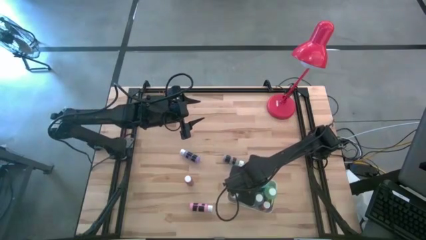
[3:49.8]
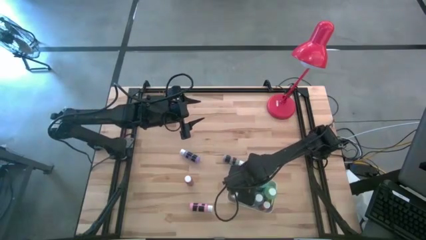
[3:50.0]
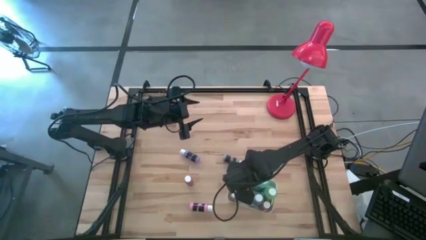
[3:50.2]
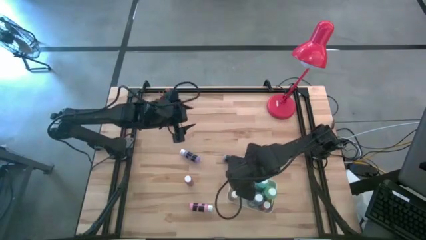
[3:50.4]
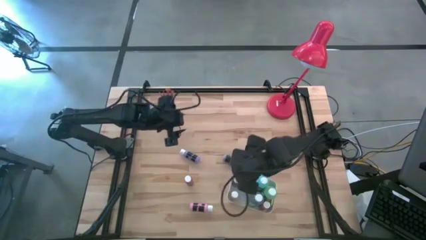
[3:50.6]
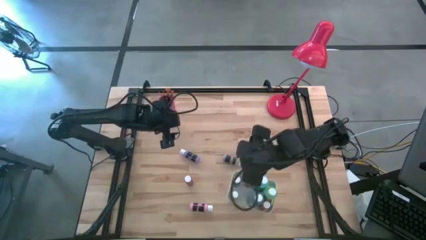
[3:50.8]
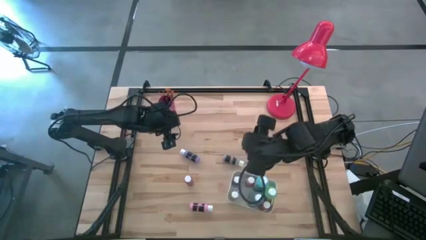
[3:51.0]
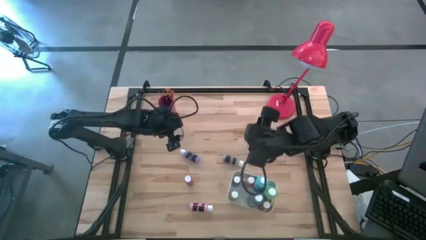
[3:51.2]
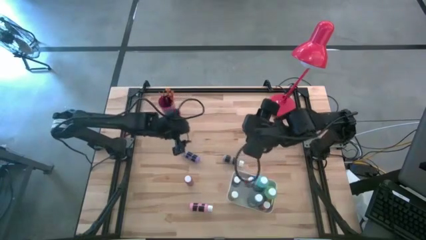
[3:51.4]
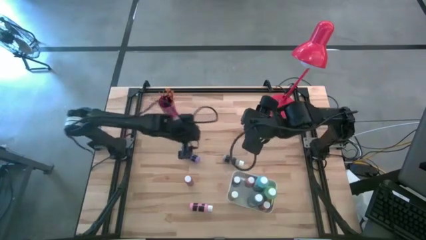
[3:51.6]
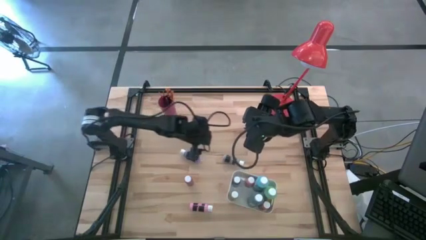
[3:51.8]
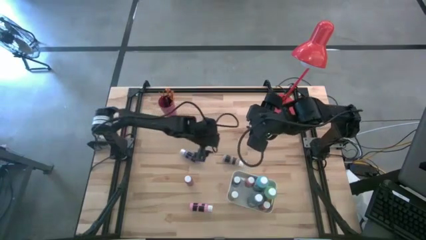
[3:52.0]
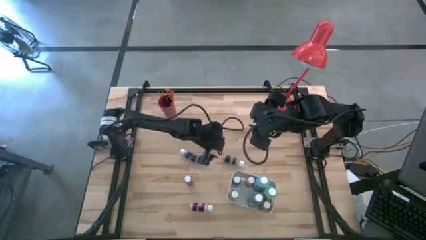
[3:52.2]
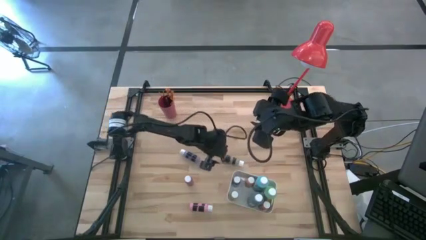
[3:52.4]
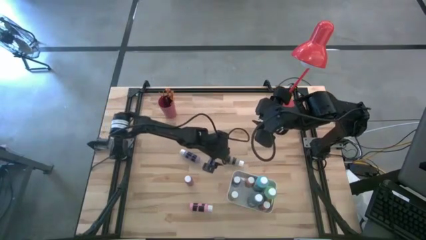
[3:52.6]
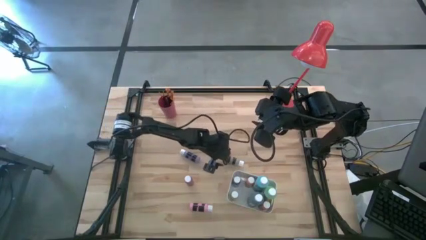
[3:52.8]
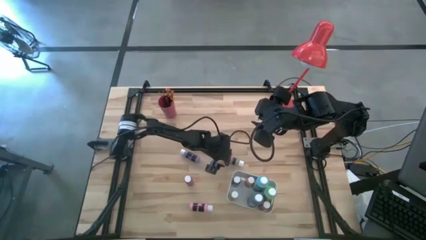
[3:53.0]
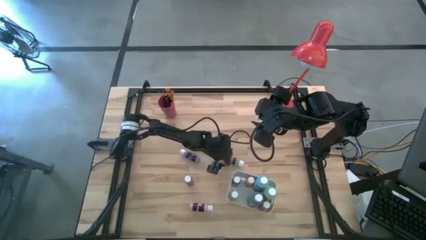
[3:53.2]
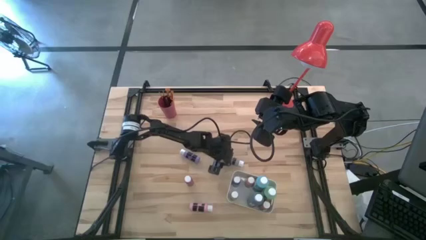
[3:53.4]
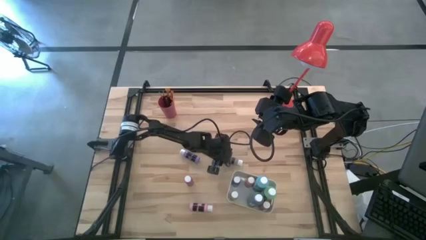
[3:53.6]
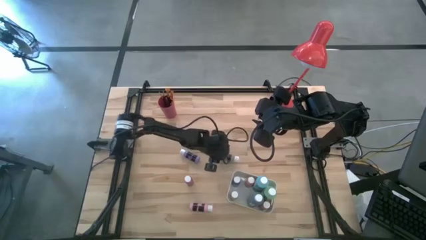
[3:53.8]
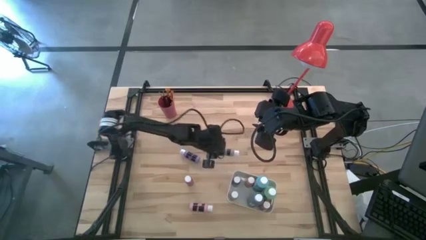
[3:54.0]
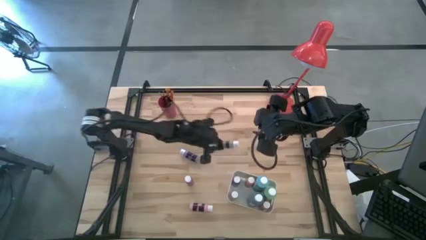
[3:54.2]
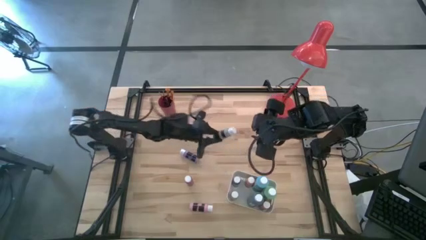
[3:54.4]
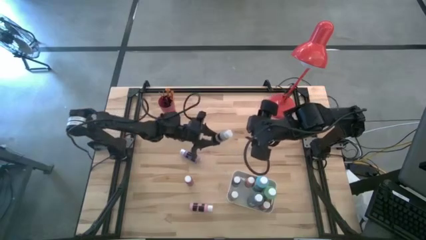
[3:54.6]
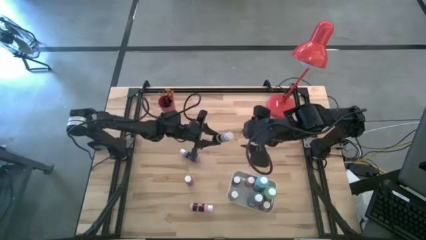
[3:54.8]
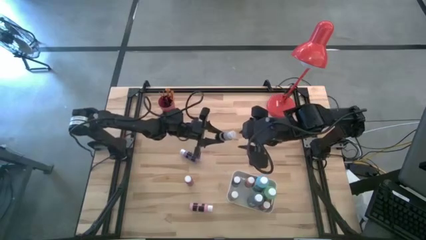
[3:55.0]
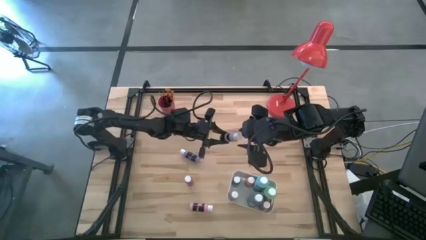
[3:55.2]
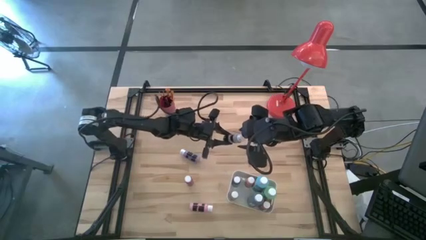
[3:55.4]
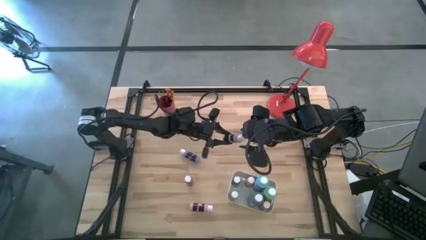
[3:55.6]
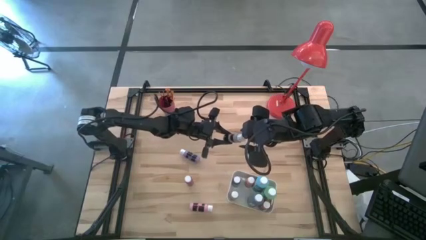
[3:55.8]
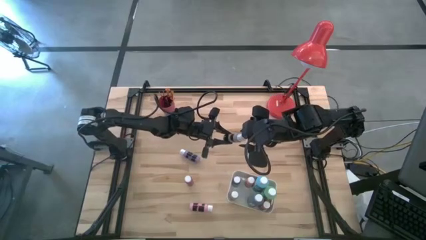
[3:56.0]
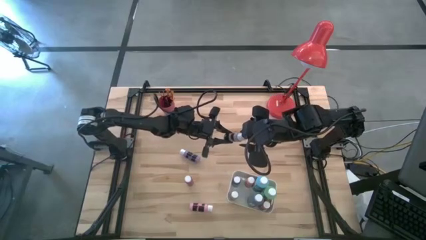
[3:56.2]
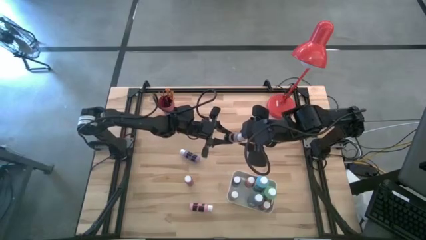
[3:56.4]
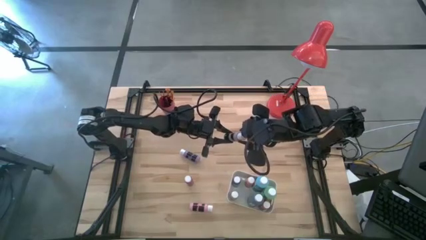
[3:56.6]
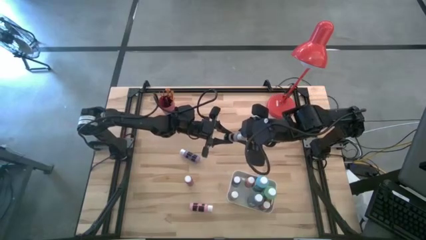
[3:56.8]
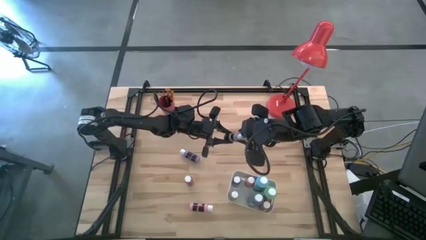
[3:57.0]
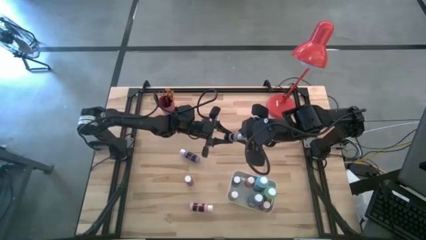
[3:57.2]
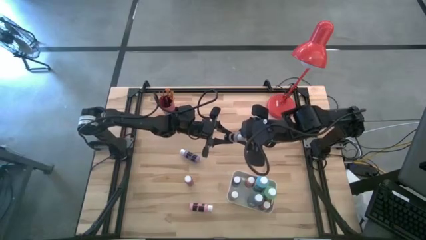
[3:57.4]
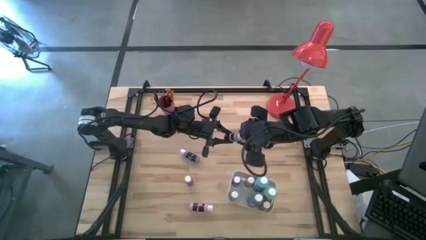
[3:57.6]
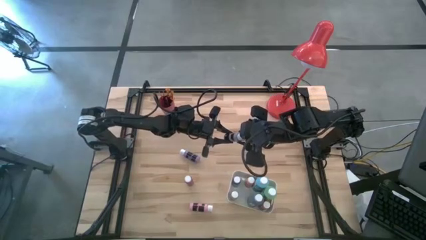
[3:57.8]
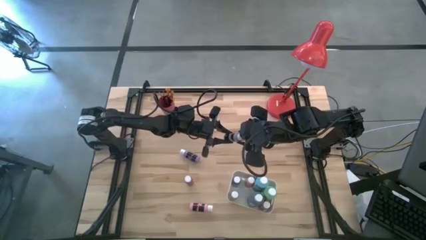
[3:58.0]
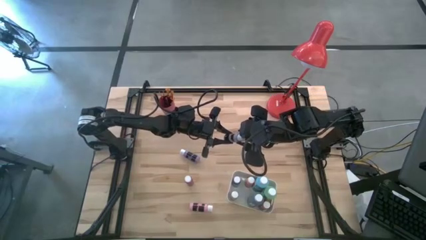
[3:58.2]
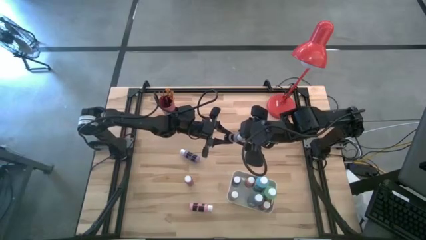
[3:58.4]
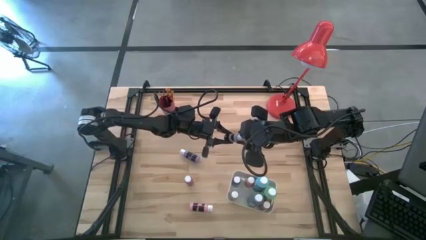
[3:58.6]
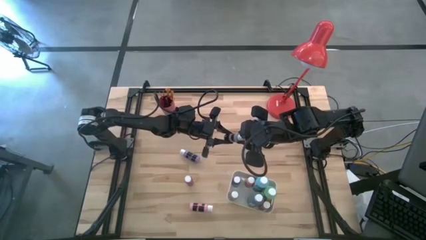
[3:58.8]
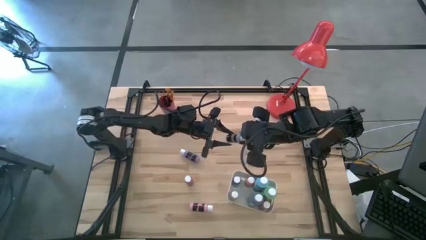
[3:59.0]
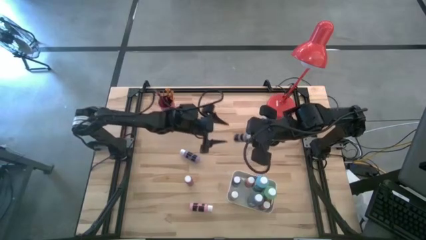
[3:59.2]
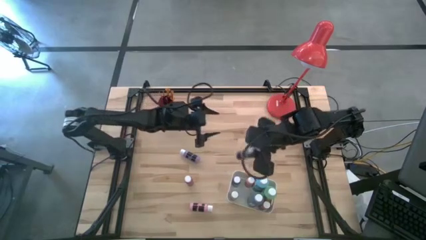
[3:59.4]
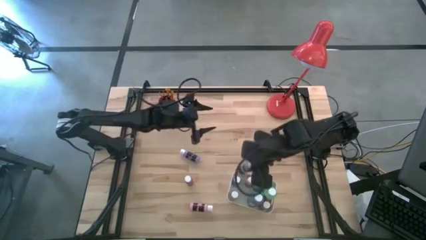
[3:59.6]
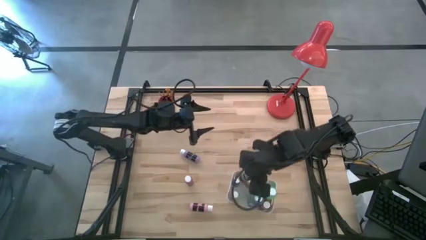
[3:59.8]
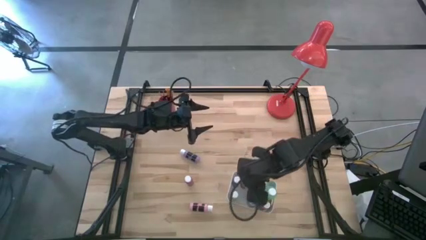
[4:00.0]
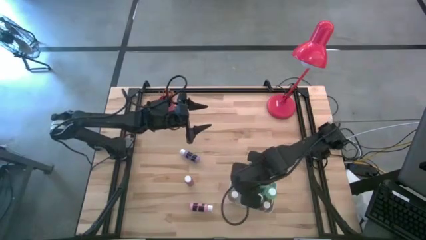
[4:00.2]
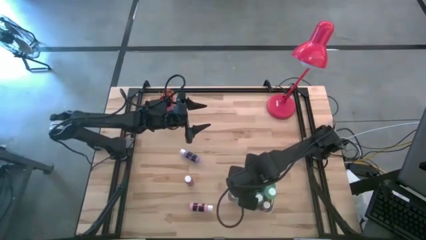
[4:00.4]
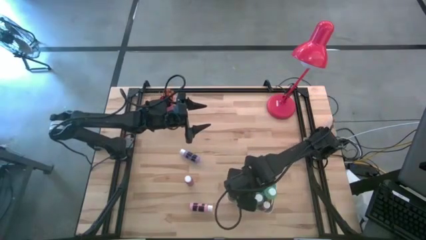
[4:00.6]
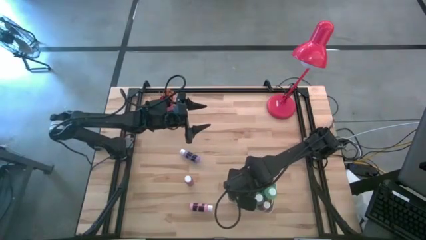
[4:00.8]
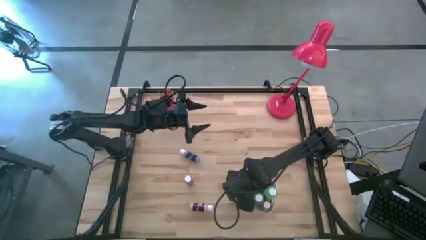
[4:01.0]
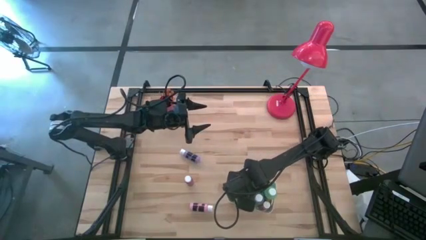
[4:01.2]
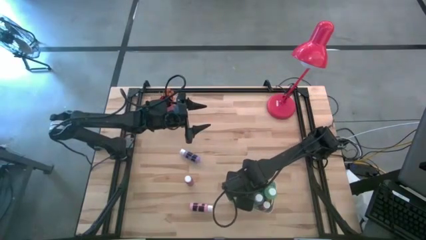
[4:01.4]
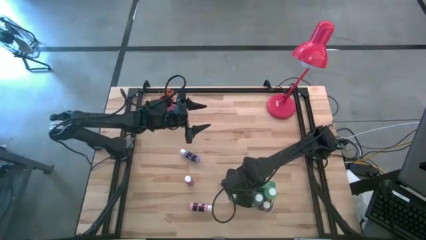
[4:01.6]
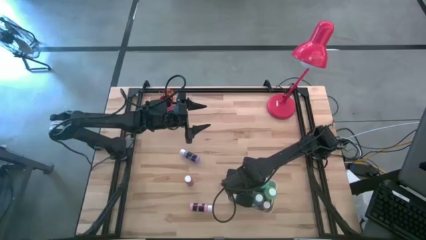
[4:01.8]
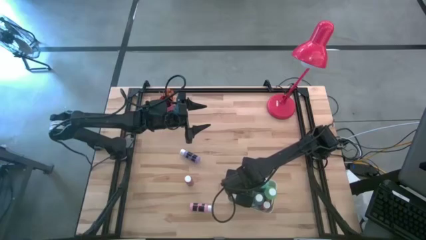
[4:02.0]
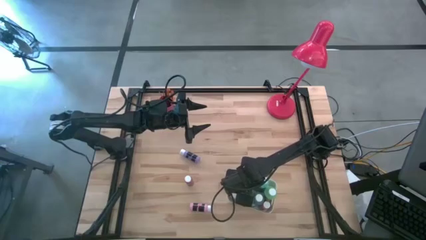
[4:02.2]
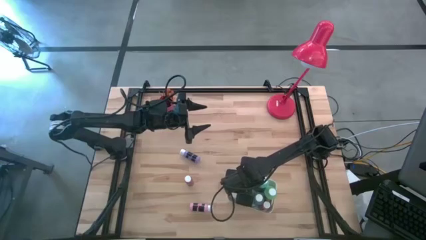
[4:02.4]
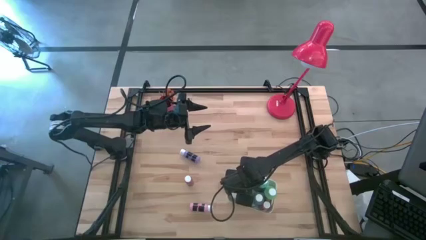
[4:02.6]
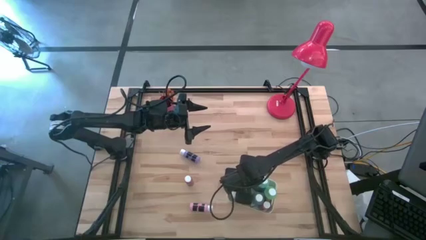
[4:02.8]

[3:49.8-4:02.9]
Task: Pick & Place Paint Supplies
Put the gray paint bottle into the white bin

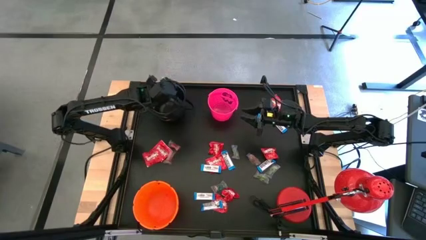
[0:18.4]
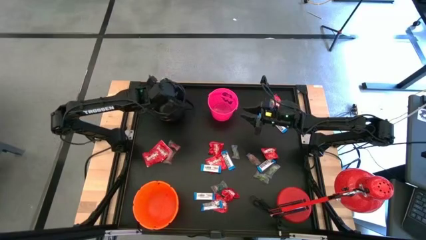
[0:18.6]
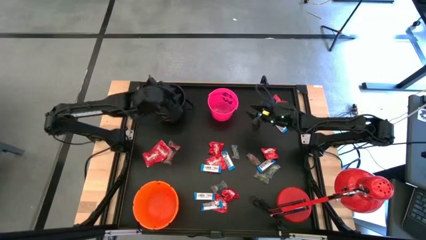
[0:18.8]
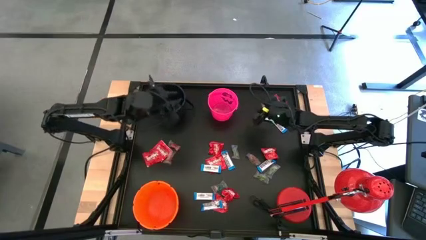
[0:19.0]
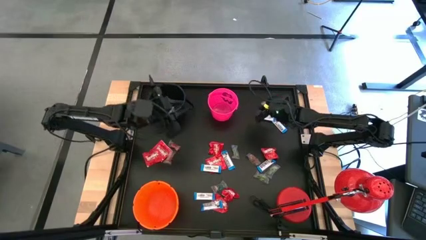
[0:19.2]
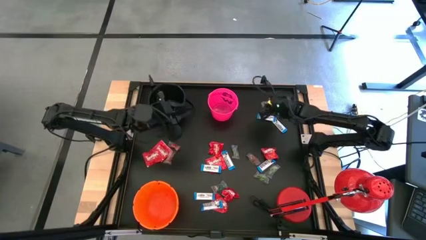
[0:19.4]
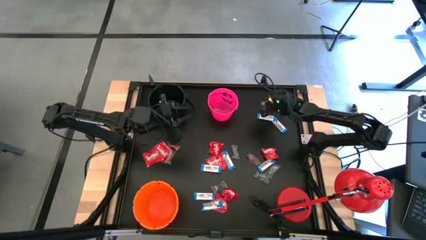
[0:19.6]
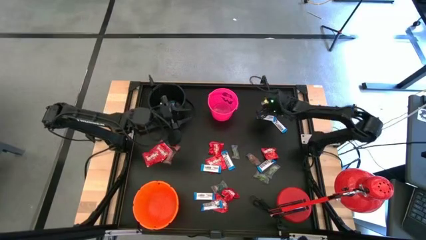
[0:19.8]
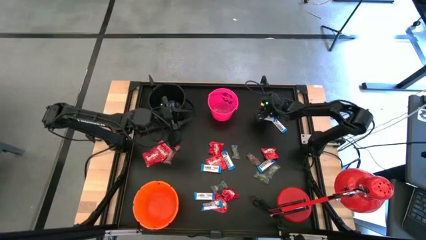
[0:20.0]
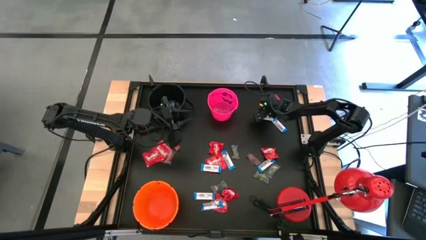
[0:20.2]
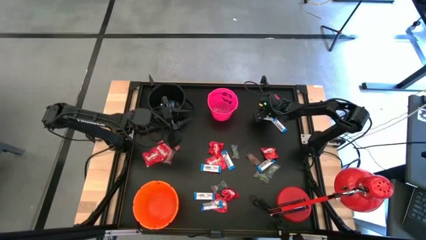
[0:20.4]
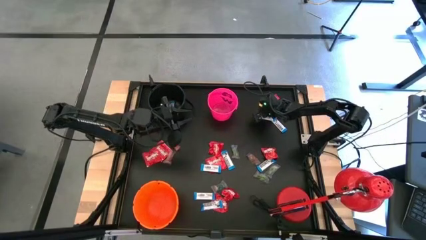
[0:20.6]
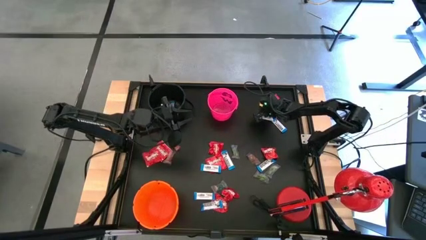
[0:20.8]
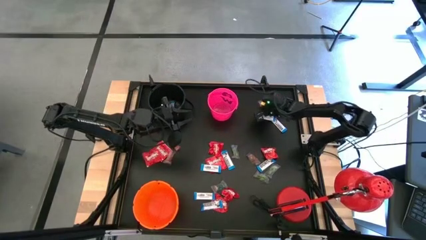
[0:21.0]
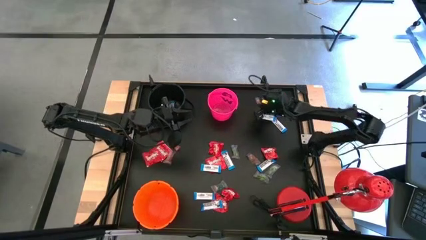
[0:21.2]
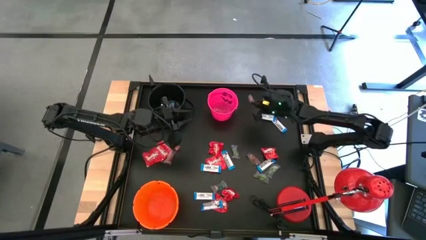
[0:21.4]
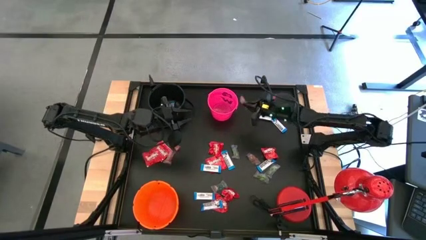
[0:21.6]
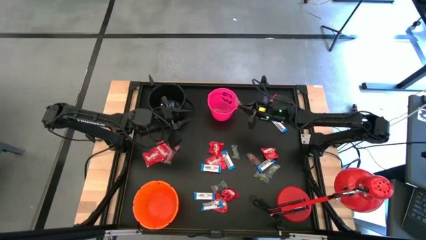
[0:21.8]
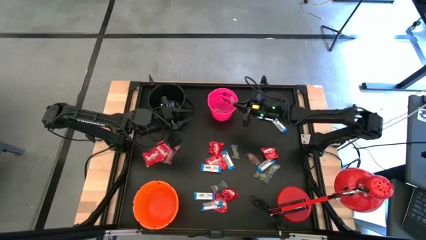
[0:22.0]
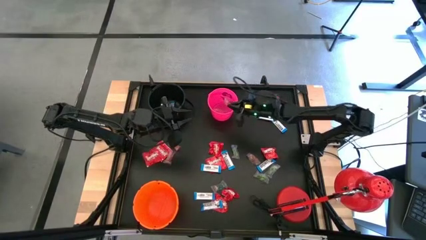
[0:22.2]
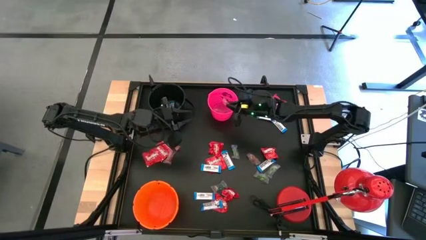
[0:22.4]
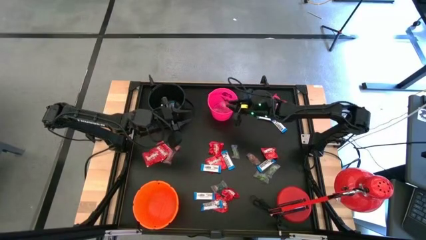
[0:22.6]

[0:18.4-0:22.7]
Task: Organize candy in baskets
Put the orange gummy into the pink bucket
